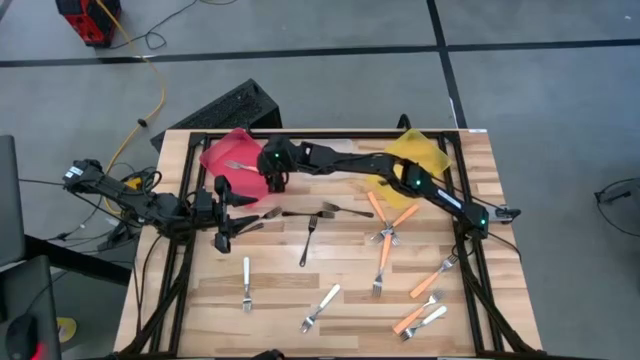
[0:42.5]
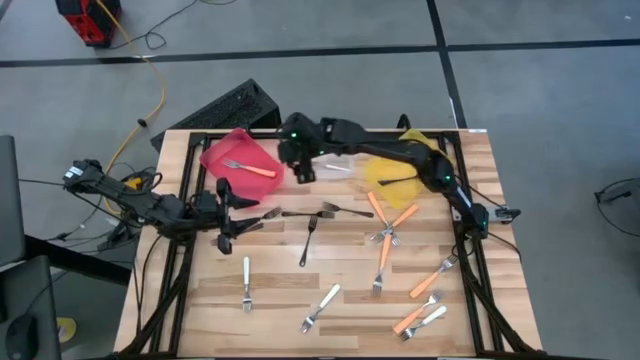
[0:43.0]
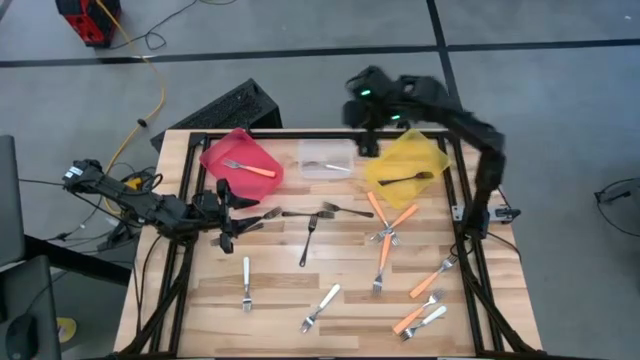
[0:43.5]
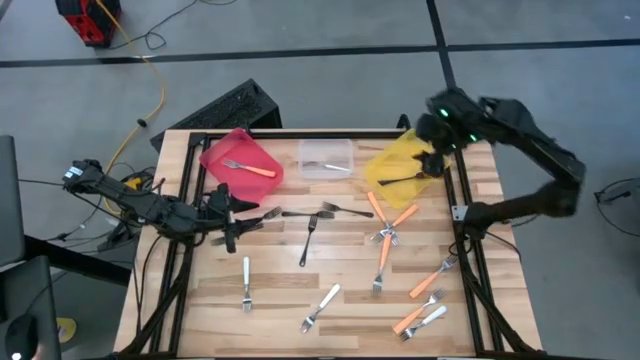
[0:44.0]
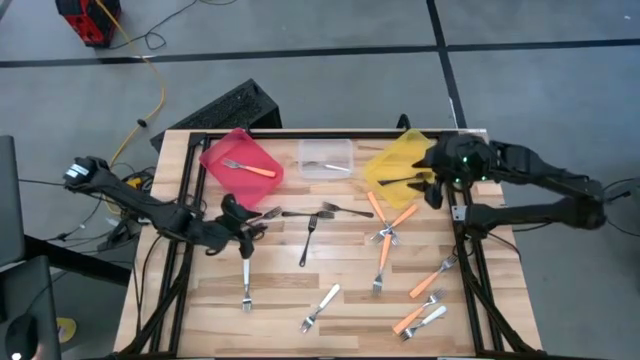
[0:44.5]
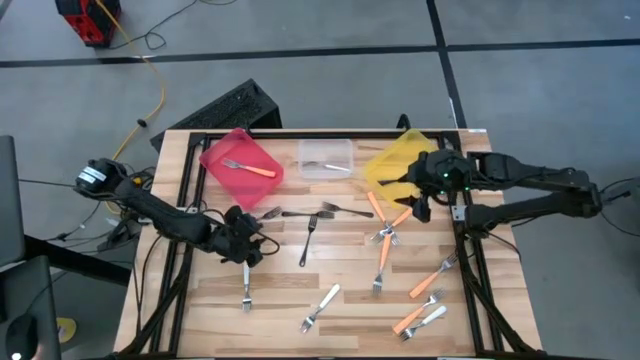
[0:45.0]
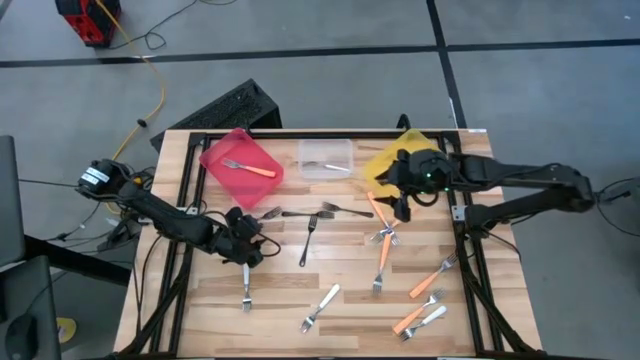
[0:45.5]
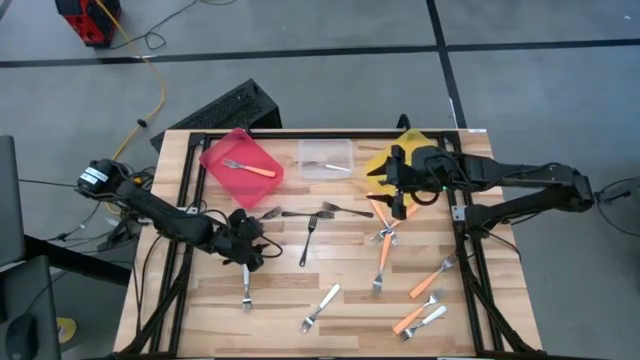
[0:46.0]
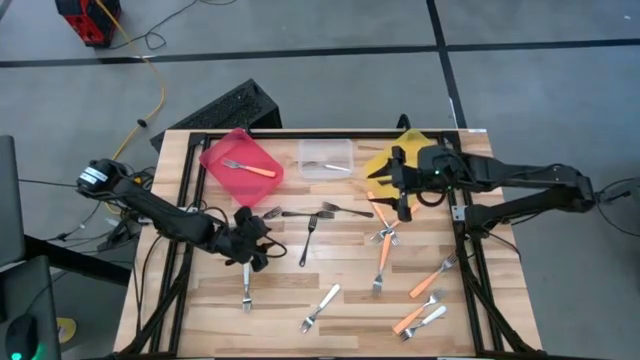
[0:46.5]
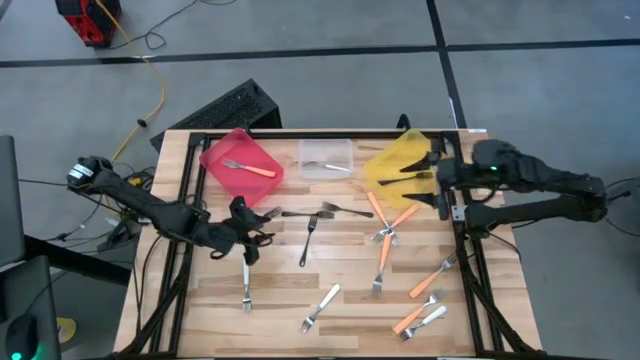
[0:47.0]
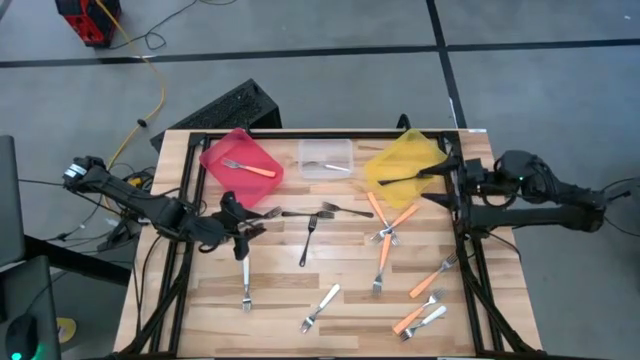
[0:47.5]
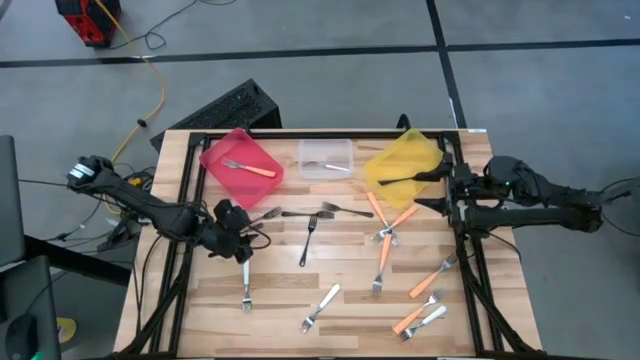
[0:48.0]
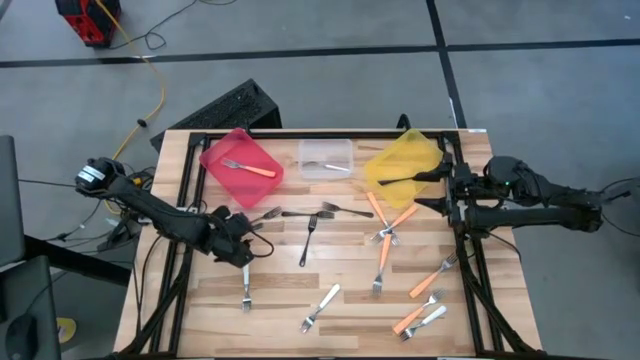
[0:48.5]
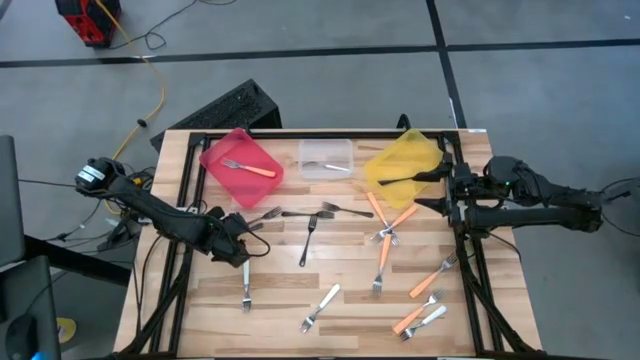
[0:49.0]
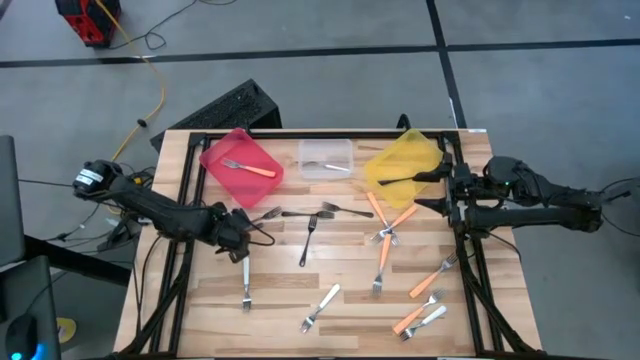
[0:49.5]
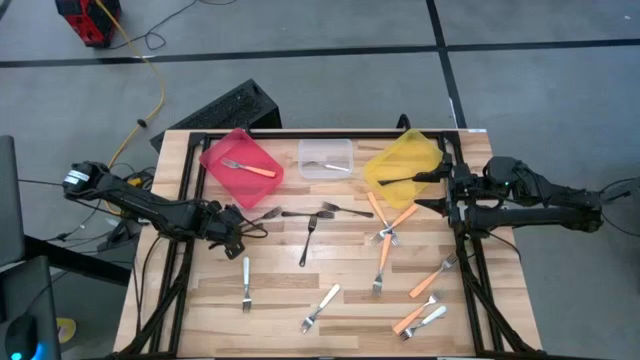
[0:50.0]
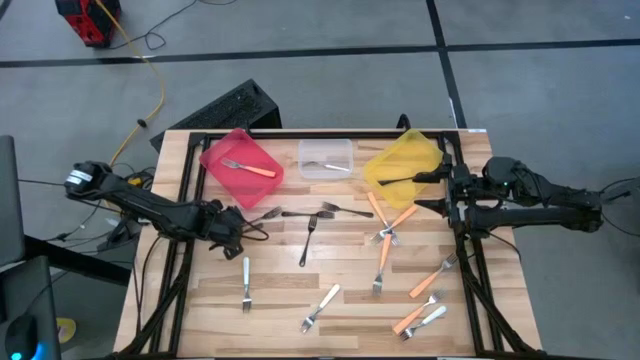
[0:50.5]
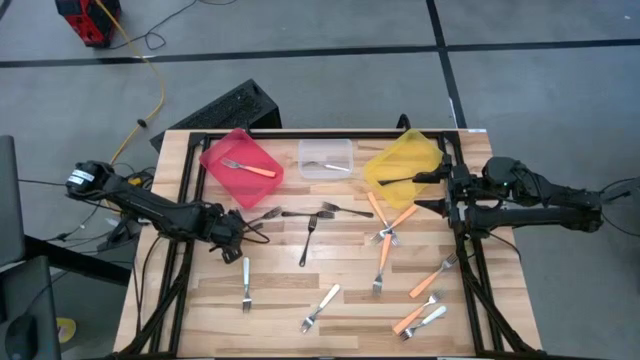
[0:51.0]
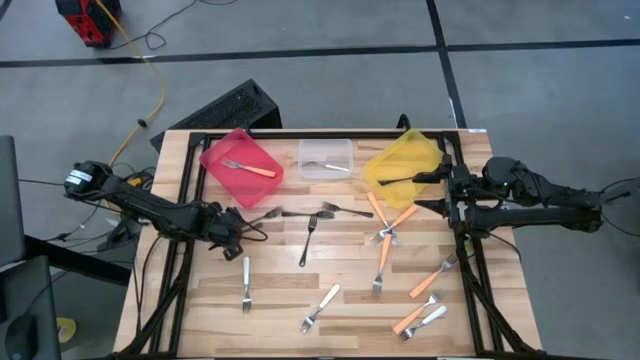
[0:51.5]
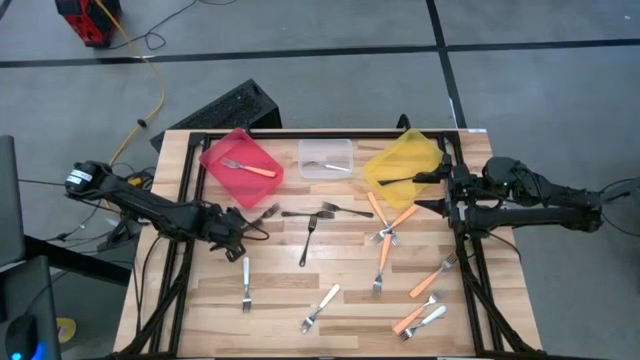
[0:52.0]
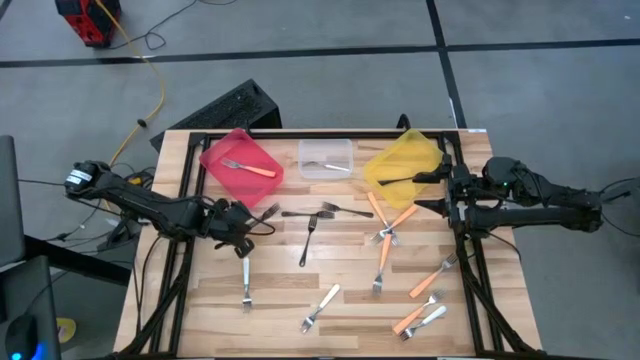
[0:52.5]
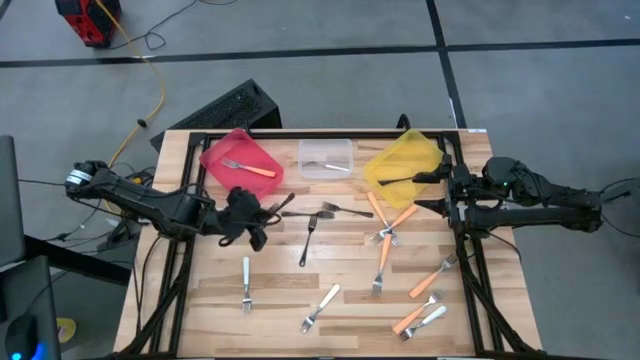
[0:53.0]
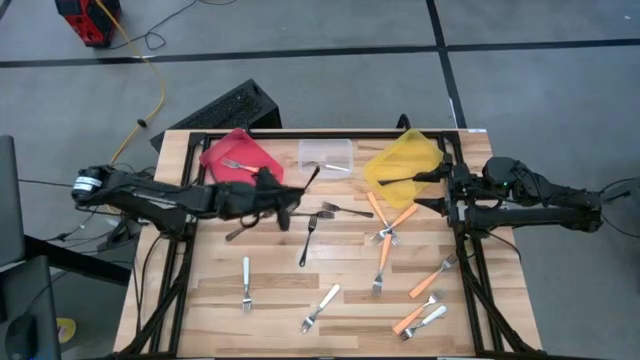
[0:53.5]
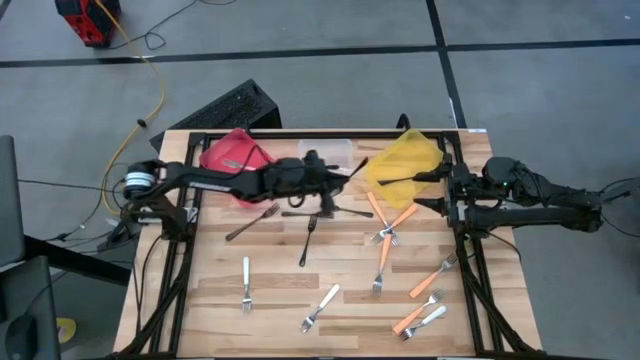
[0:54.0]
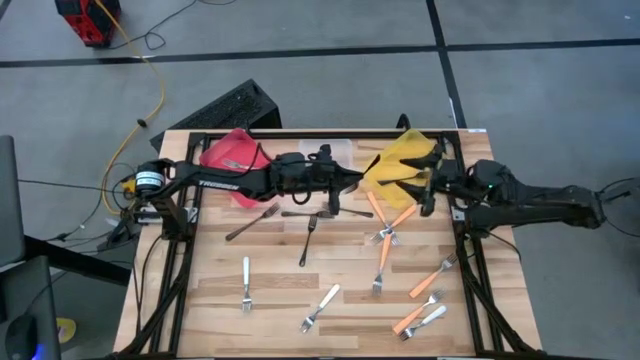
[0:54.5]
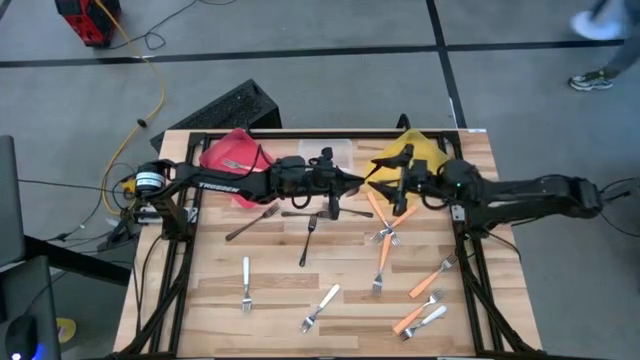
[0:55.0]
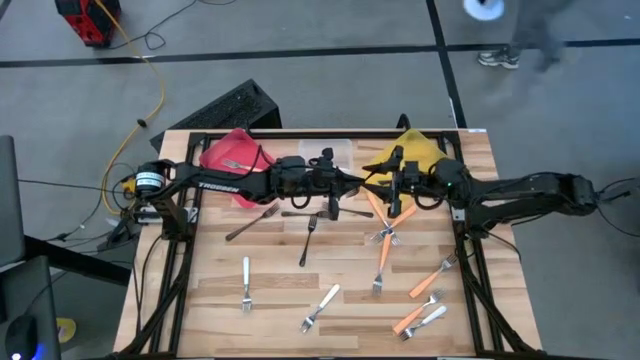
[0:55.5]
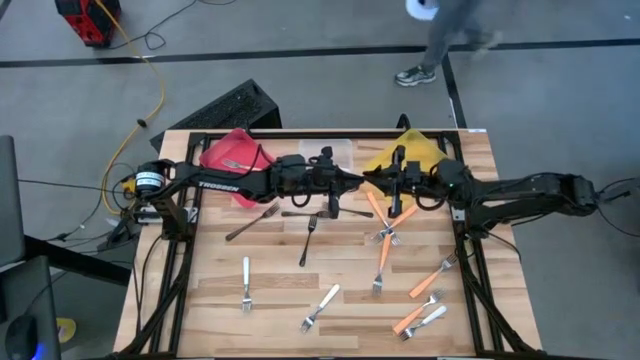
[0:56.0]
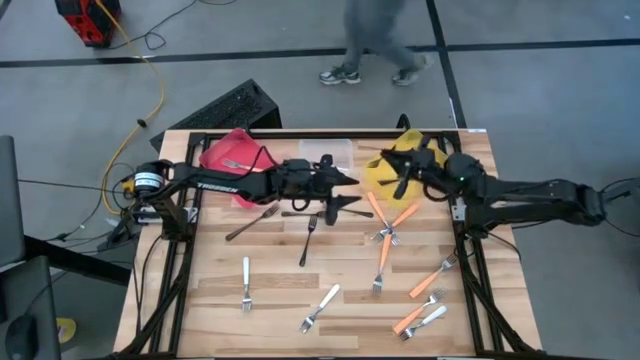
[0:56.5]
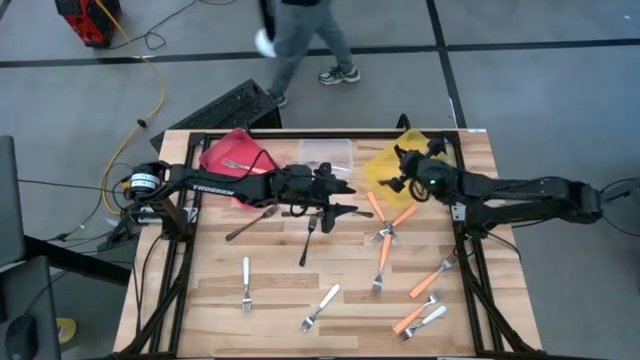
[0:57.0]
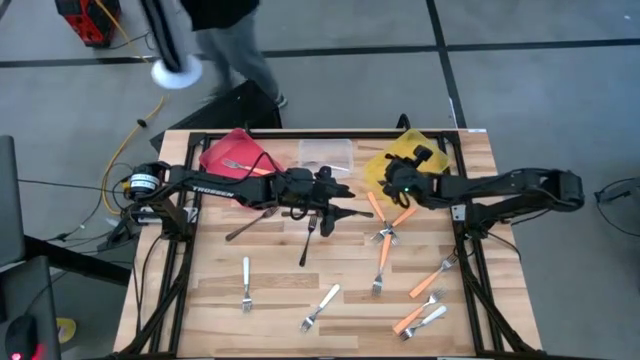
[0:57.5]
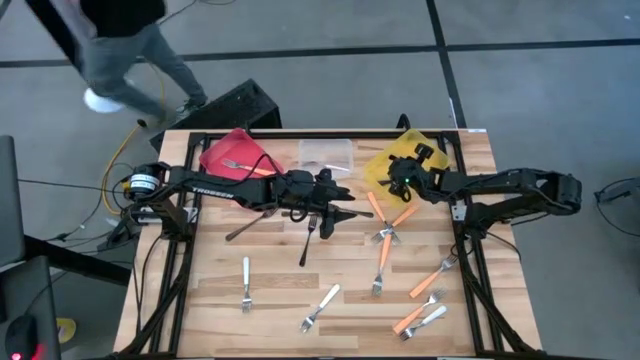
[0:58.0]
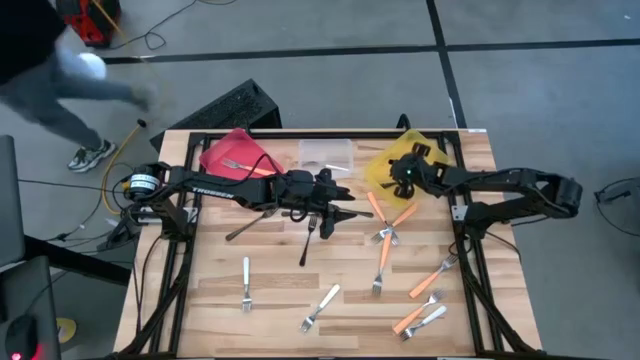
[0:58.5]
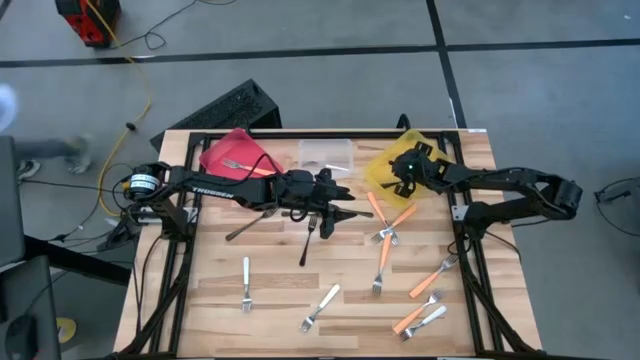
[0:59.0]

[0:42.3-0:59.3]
Task: Sort silverware by color (type)
Put the black fork into the yellow bin

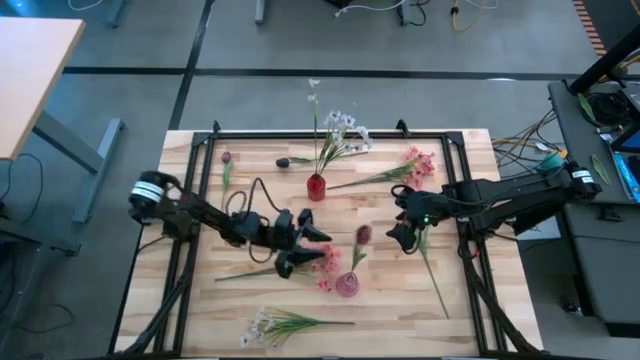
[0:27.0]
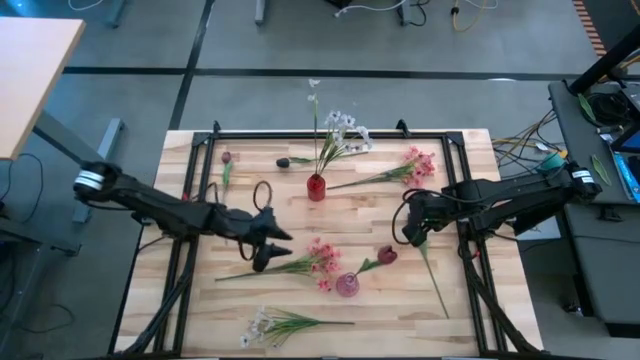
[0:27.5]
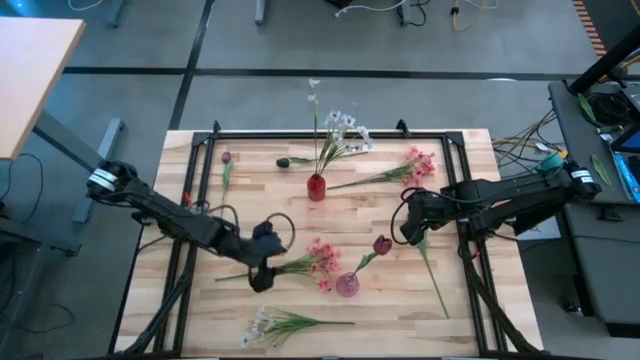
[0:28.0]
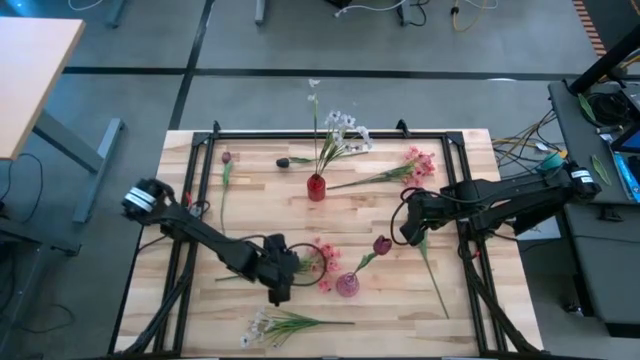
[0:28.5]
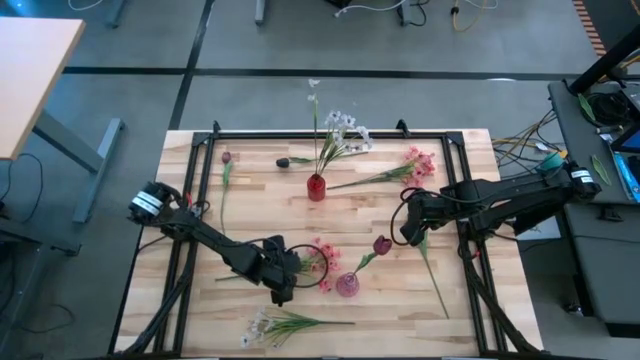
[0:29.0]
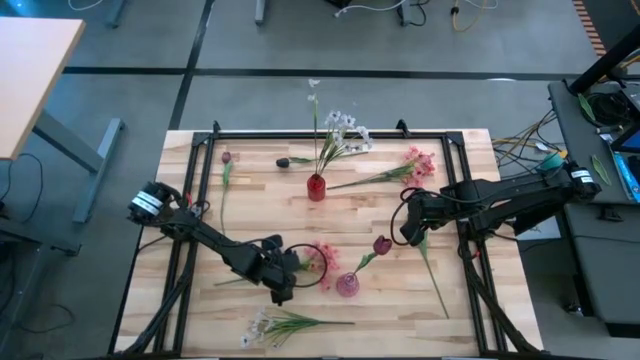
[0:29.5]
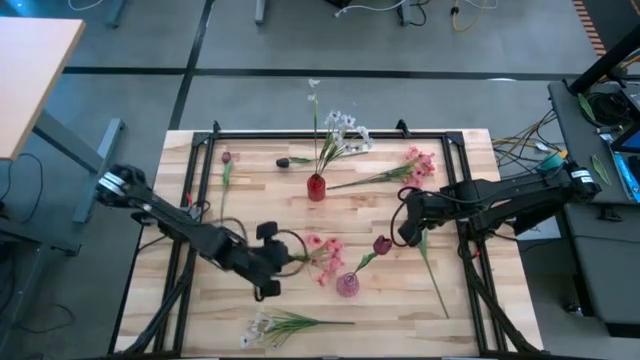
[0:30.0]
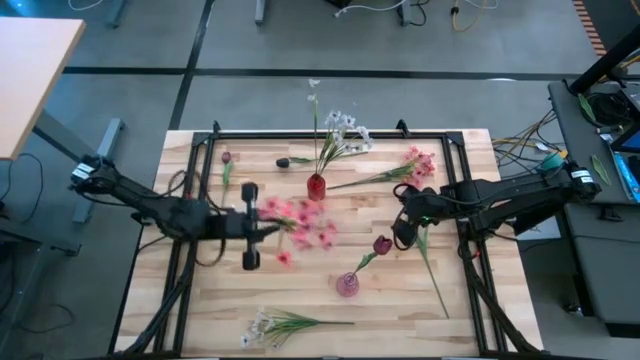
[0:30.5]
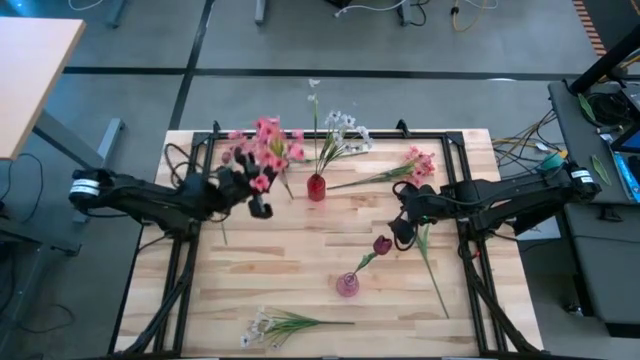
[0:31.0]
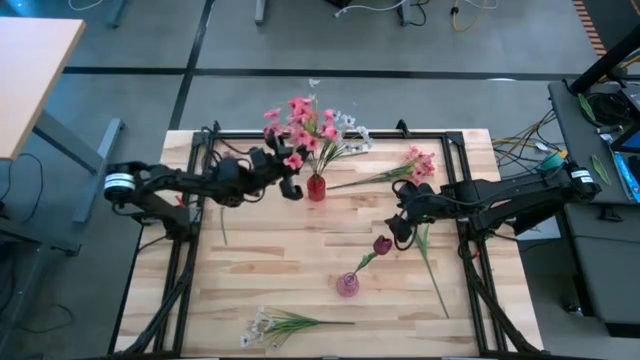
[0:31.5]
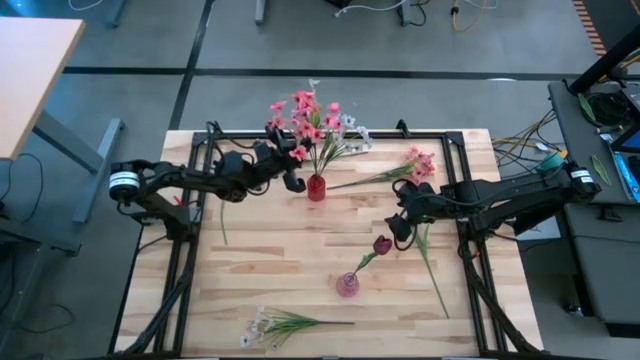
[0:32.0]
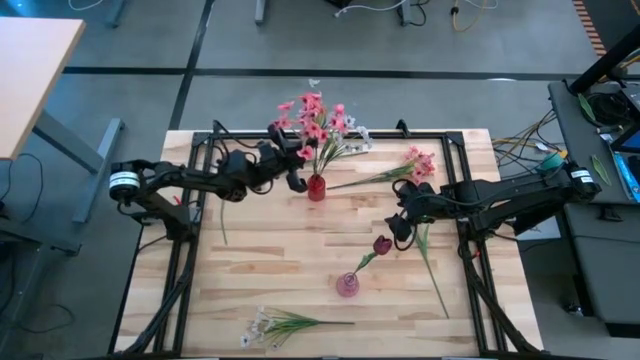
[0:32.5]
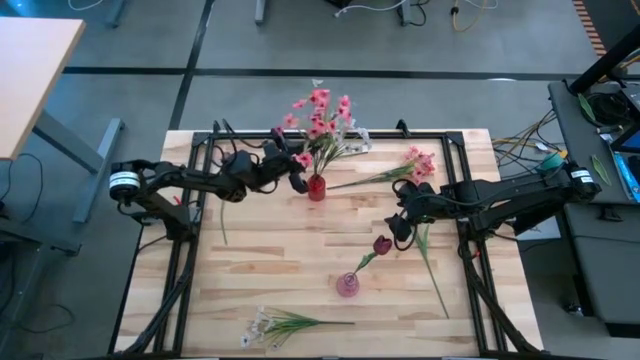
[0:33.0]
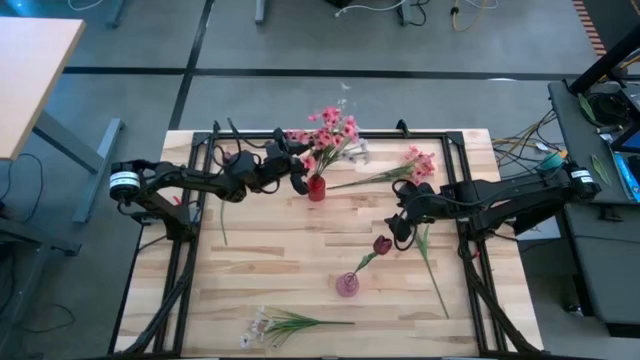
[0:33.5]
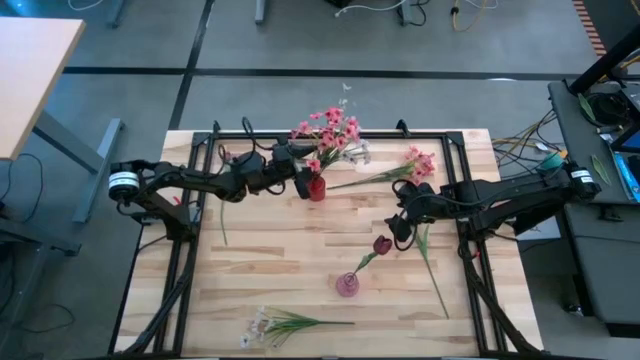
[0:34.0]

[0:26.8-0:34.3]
Task: Sort flowers into vase by color
Put the pink flowers into the red vase
